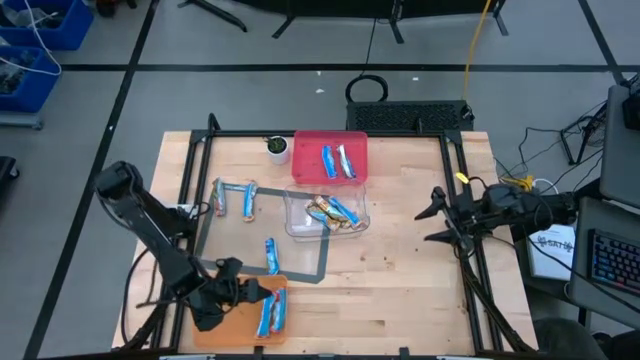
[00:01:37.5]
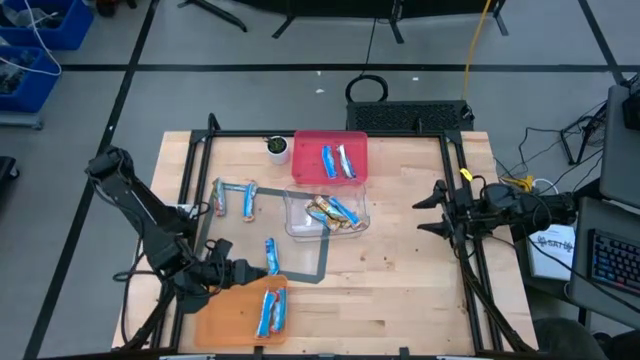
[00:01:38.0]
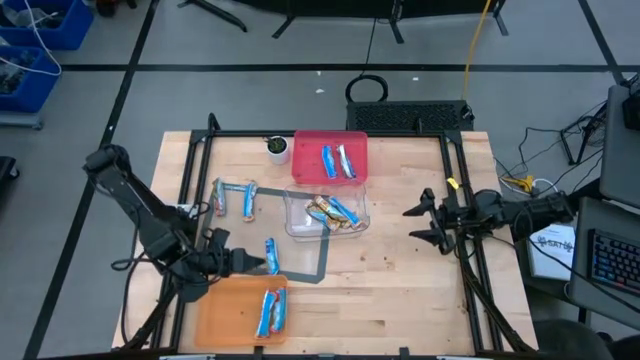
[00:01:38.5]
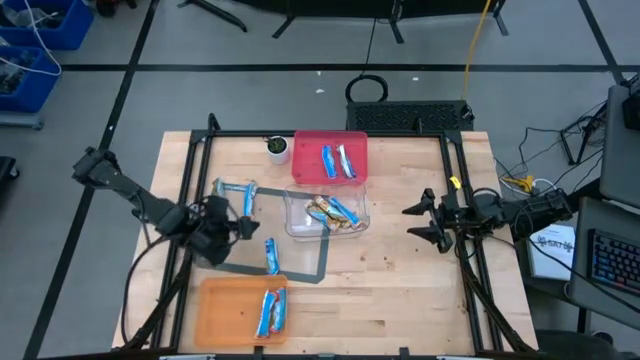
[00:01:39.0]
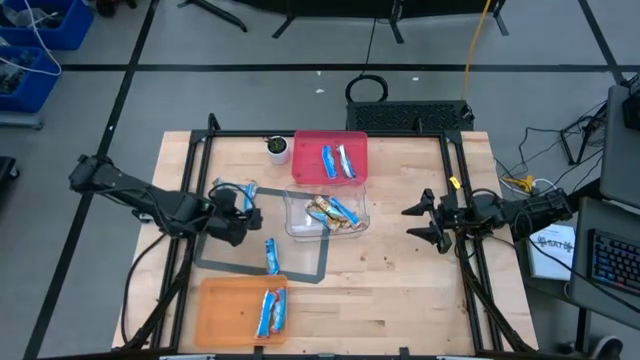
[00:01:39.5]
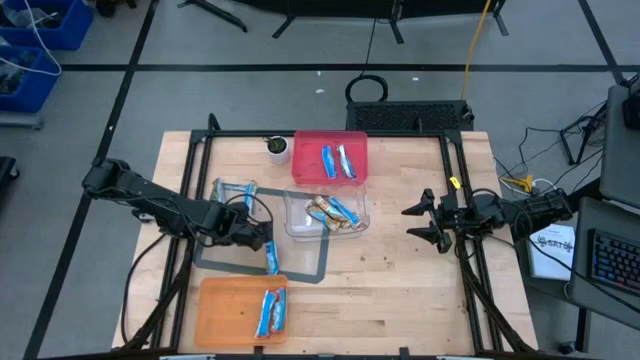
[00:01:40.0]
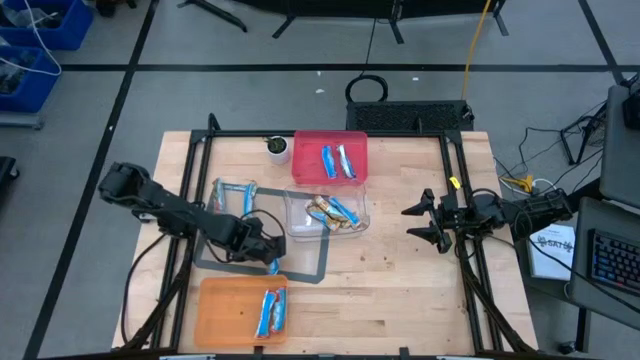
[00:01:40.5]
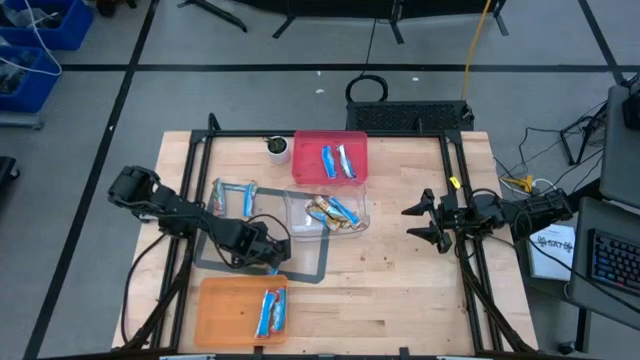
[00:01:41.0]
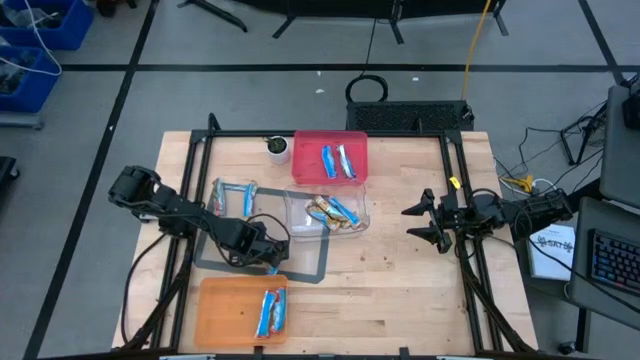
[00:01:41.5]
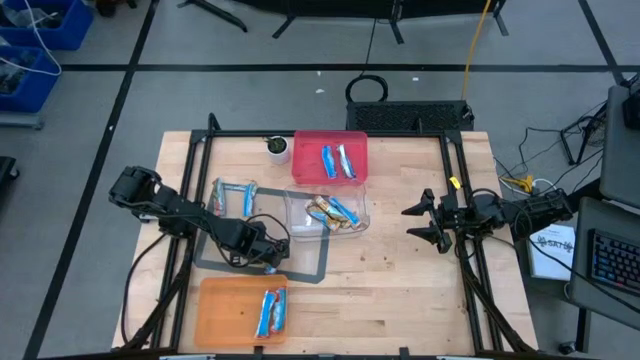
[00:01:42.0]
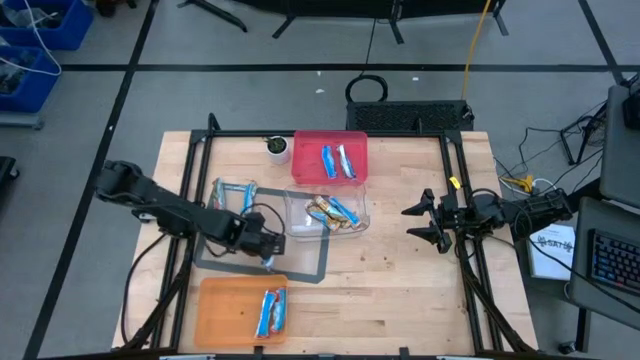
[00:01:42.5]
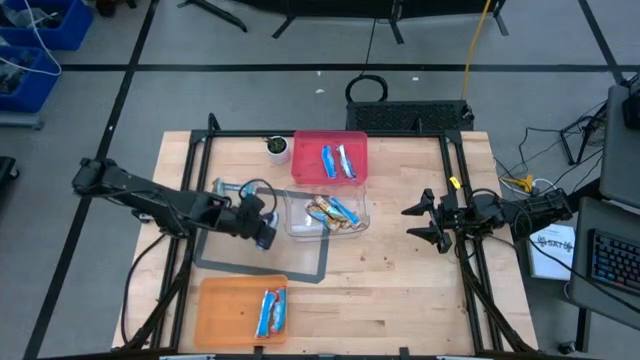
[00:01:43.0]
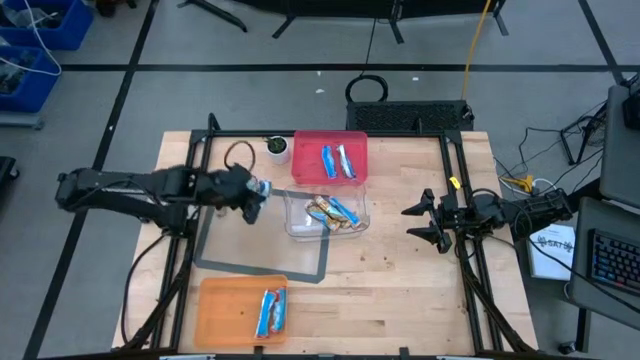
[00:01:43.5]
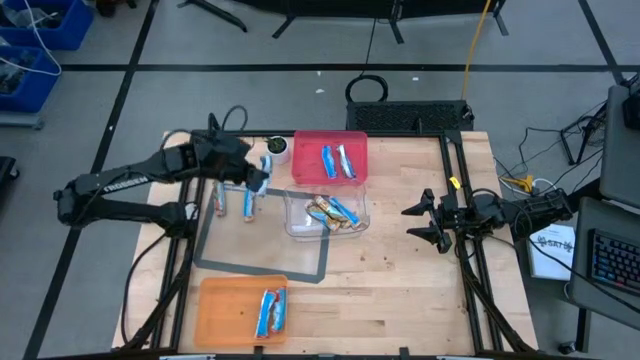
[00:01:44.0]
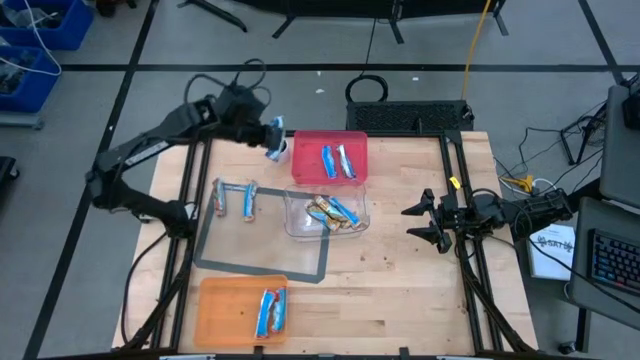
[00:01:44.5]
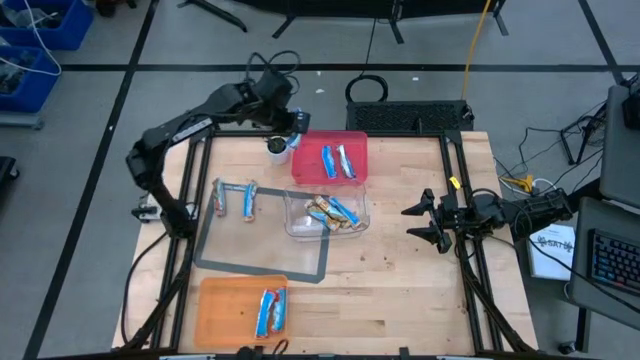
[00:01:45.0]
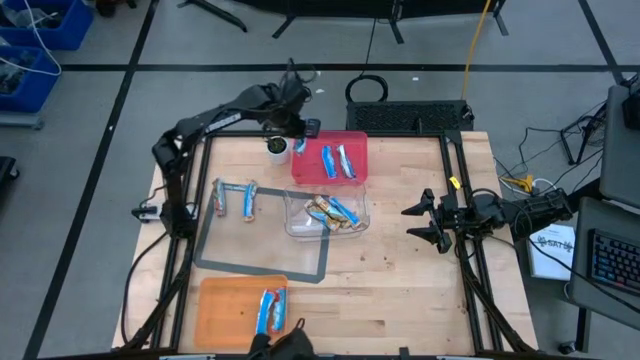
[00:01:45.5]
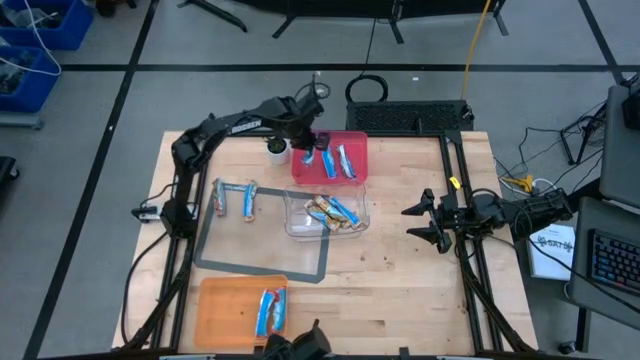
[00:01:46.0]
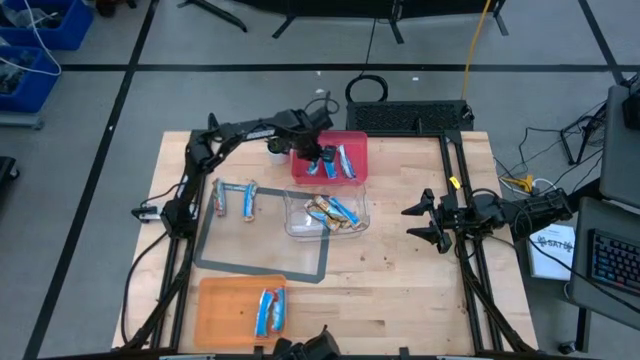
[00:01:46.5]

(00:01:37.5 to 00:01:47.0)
Task: Pick and place Granola Bars by type
Put the blue granola bar into the red bin

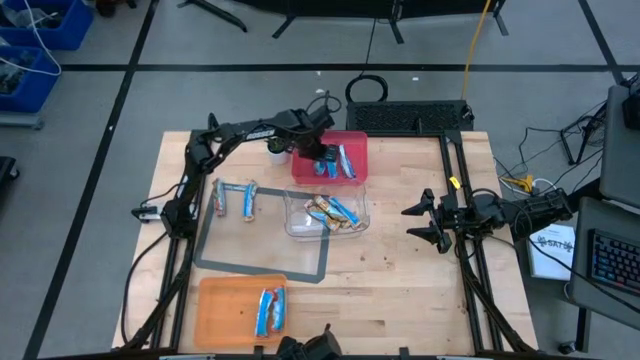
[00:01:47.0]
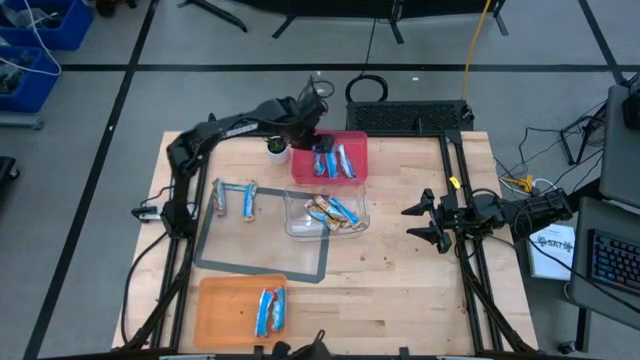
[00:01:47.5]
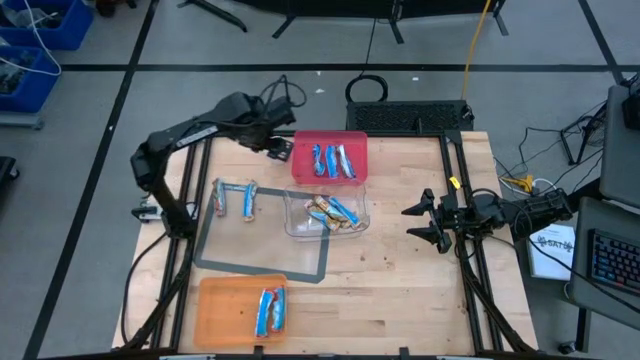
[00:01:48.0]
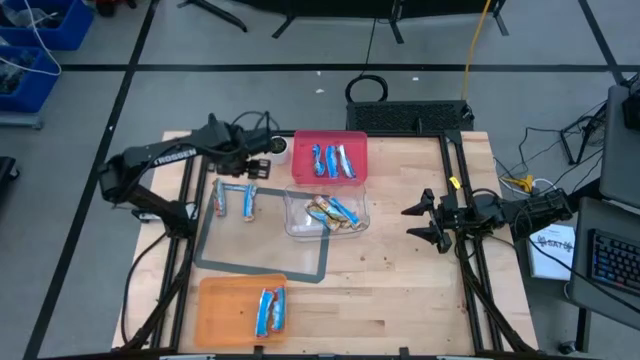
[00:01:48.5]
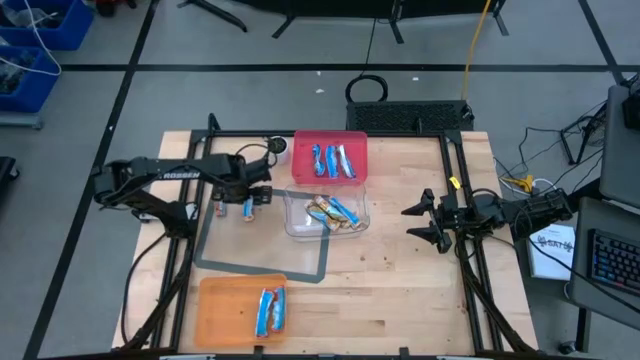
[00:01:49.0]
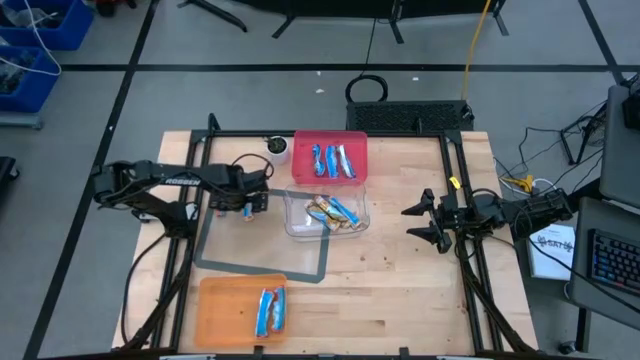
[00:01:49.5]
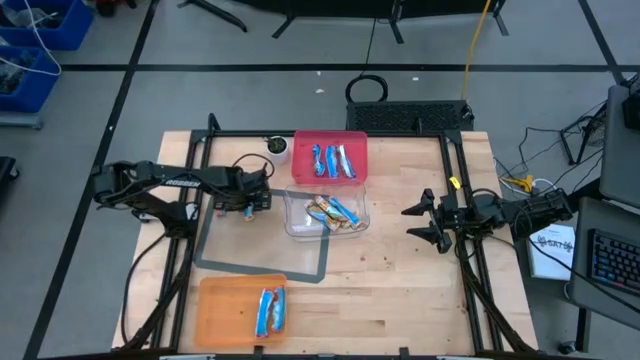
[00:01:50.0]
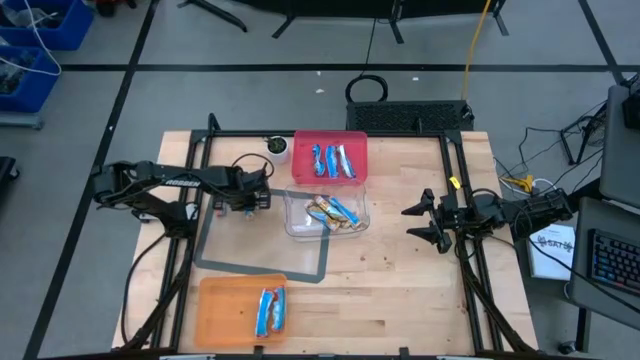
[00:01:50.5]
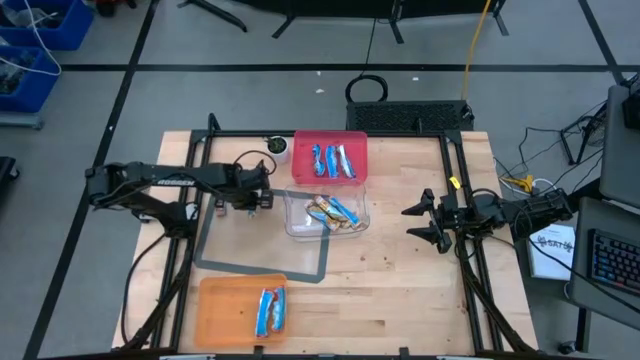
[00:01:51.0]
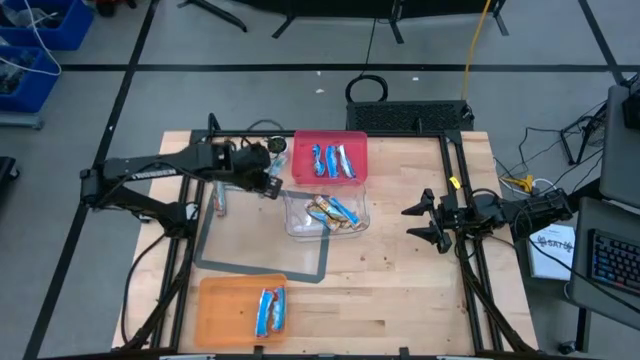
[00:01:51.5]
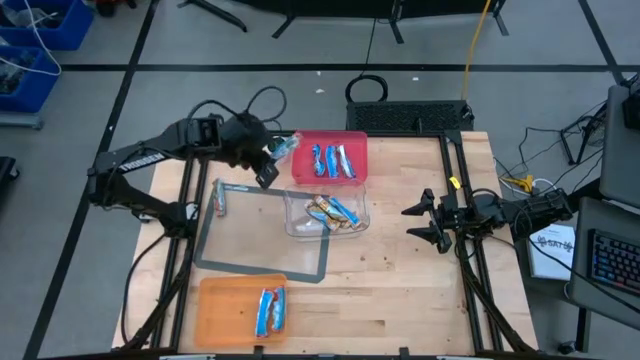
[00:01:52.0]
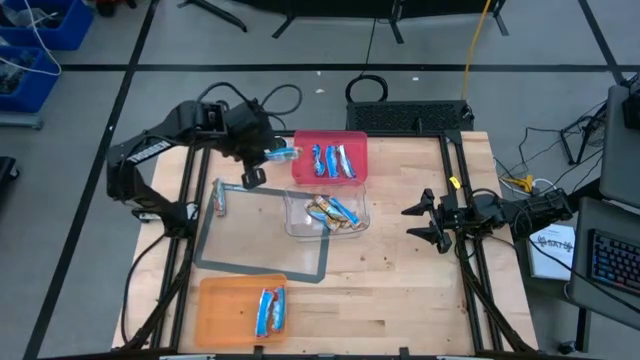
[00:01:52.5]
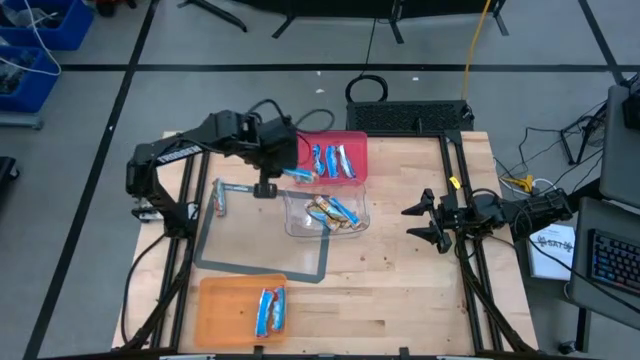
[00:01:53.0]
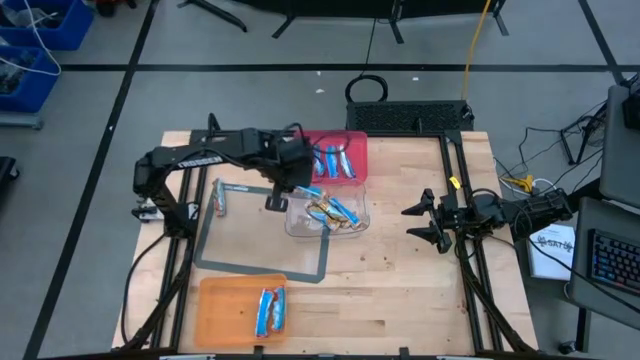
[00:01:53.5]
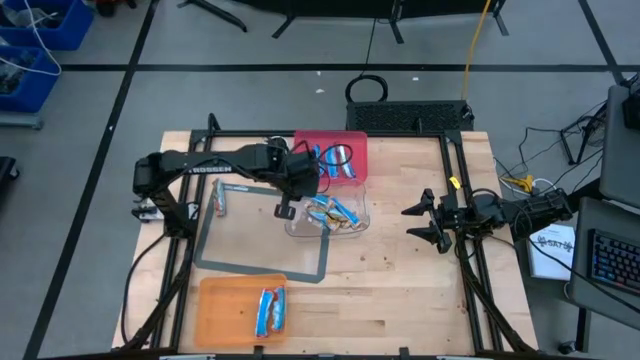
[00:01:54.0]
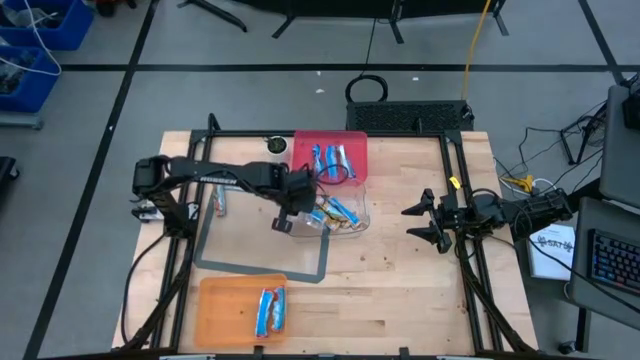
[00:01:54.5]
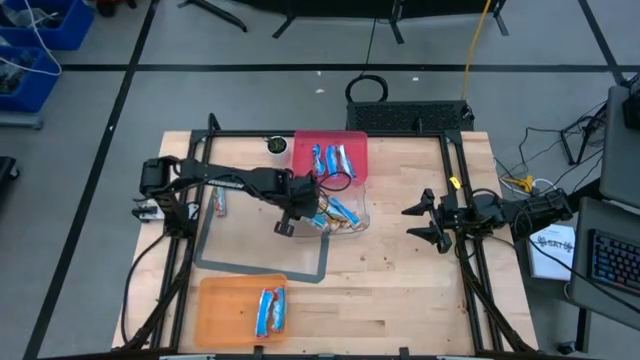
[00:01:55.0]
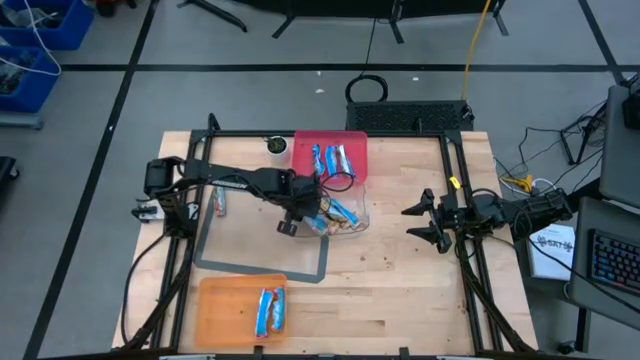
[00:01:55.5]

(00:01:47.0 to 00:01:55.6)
Put the yellow granola bar into the transparent bin

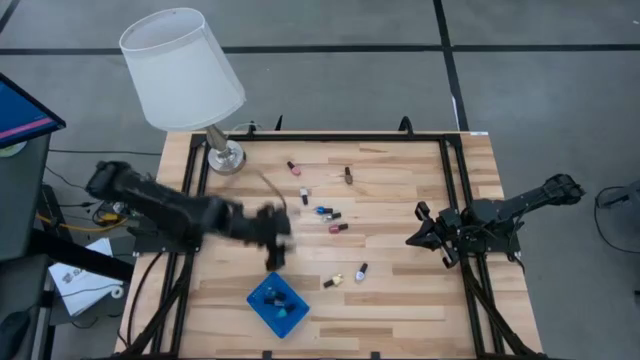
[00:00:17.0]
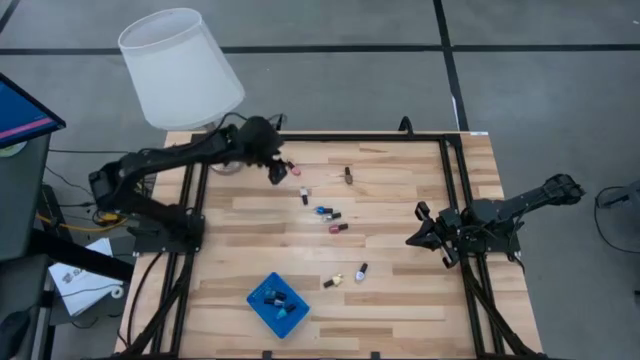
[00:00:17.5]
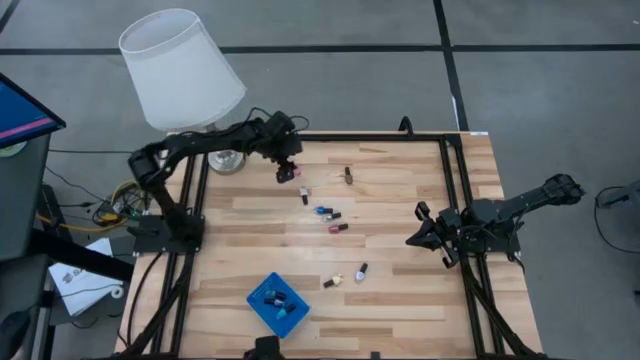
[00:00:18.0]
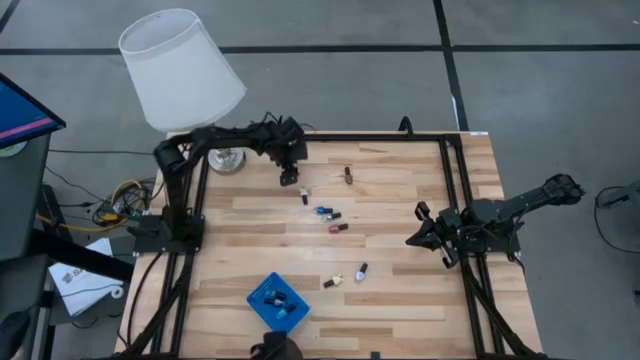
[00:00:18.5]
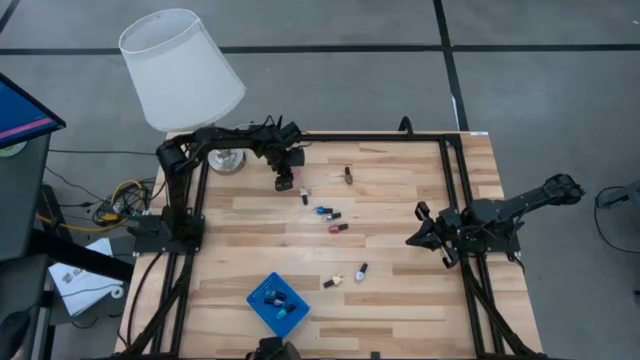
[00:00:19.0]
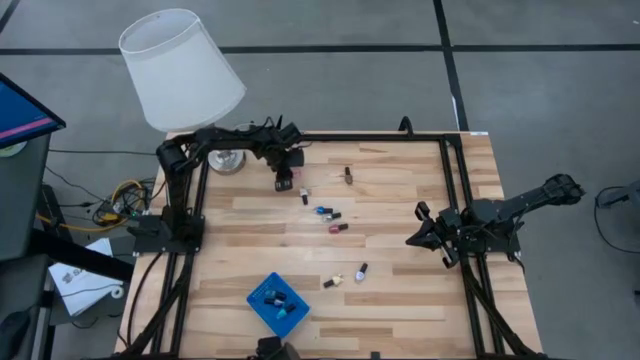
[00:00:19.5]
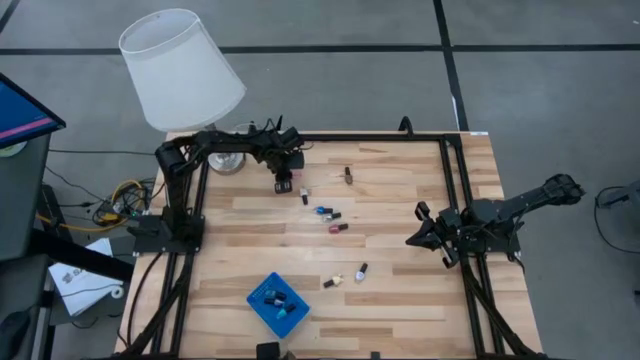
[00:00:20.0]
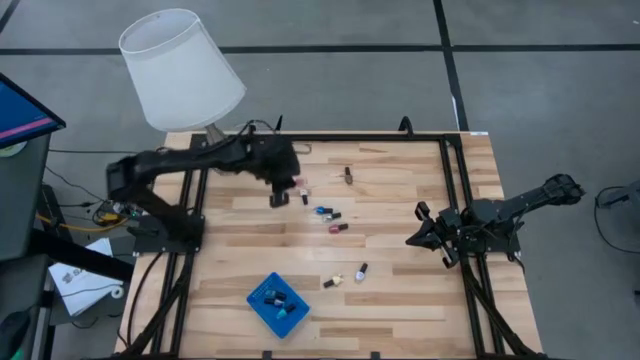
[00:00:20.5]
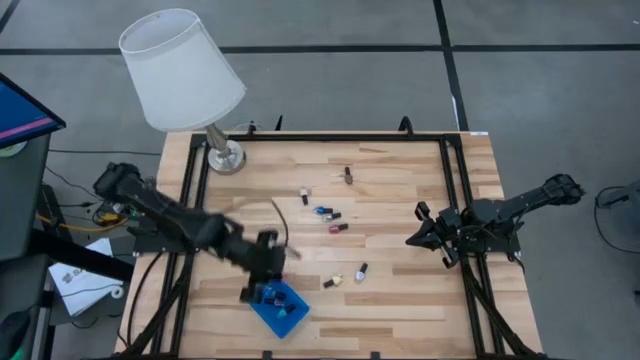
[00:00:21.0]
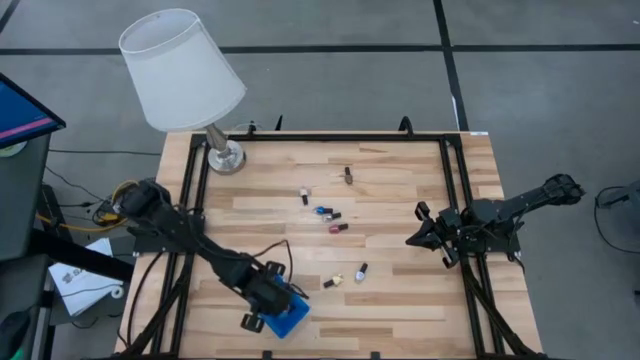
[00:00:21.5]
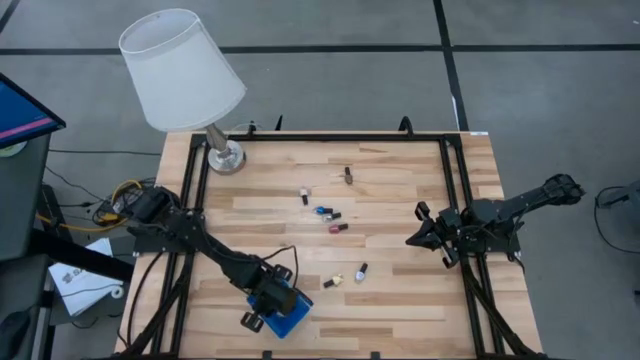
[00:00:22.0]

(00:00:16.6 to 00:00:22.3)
Task: Pick & Place Nail Polish
Put the pink nail polish bottle in the blue bin
